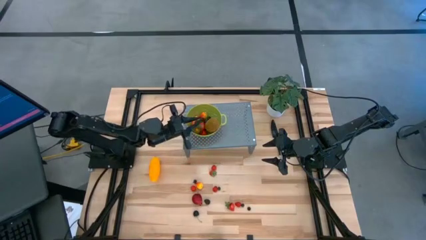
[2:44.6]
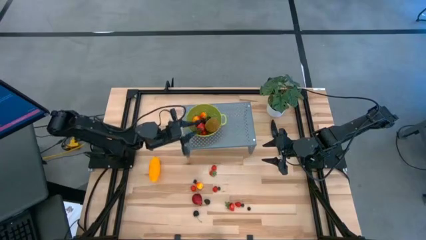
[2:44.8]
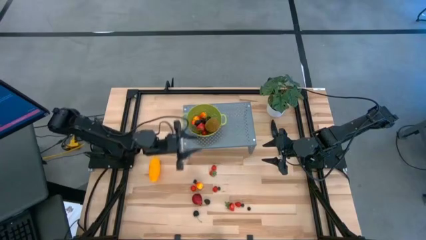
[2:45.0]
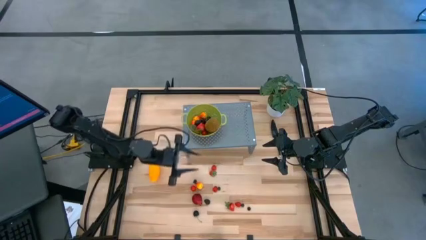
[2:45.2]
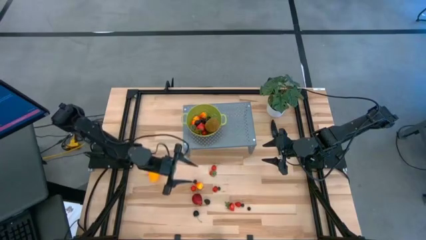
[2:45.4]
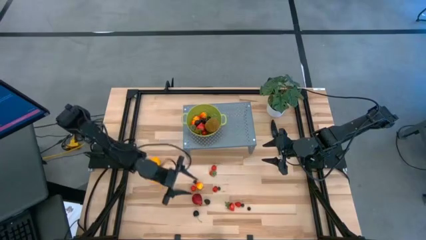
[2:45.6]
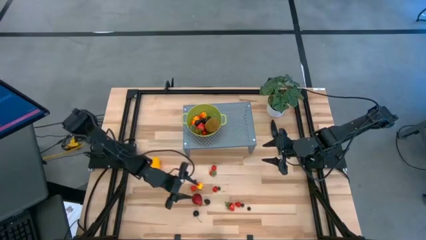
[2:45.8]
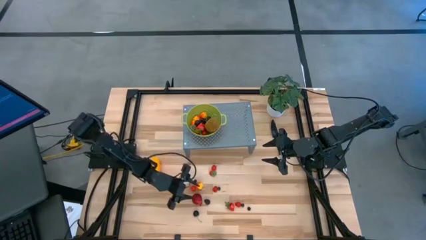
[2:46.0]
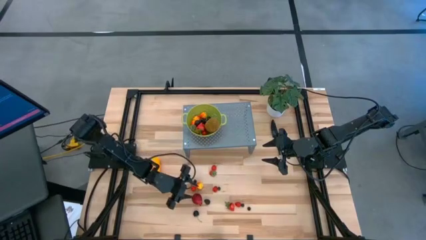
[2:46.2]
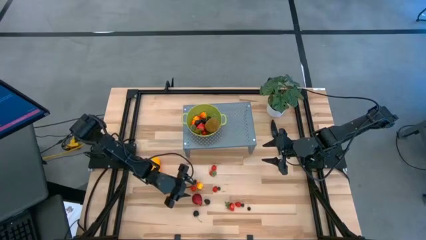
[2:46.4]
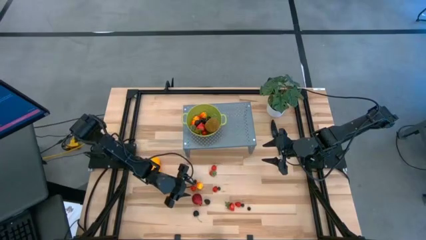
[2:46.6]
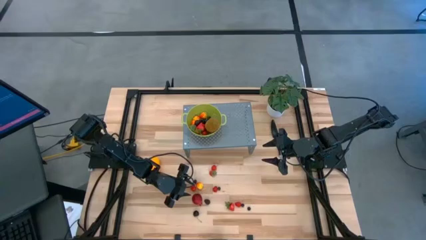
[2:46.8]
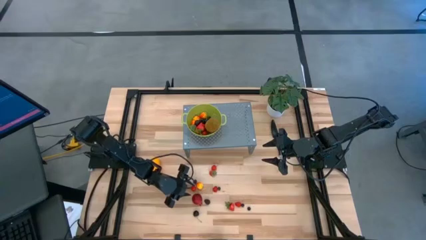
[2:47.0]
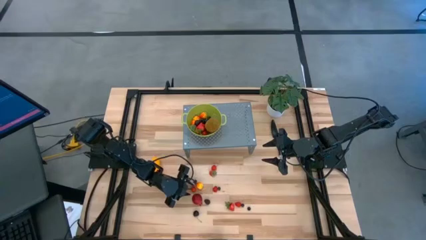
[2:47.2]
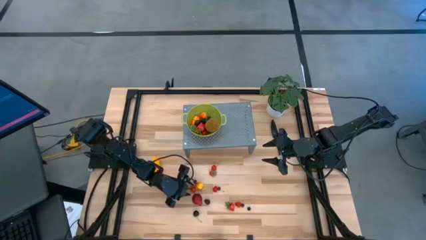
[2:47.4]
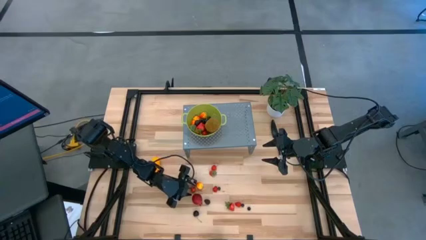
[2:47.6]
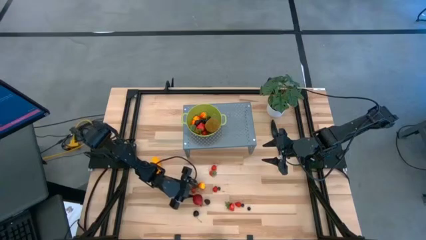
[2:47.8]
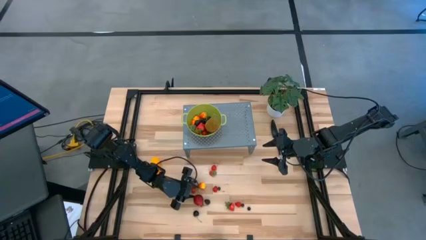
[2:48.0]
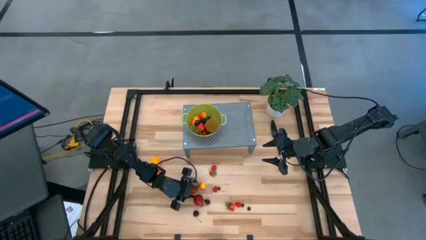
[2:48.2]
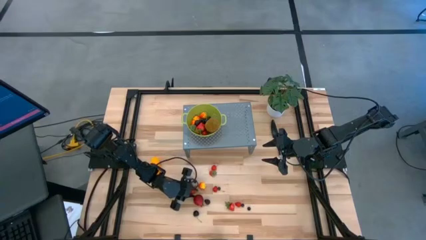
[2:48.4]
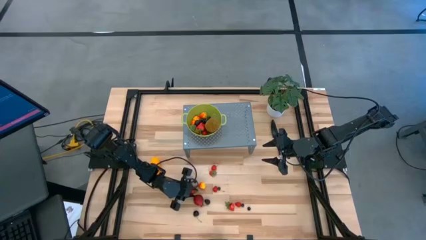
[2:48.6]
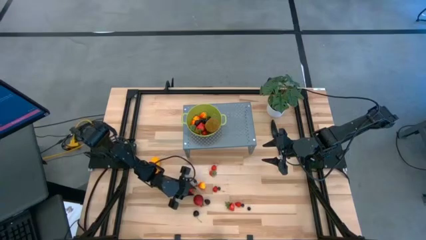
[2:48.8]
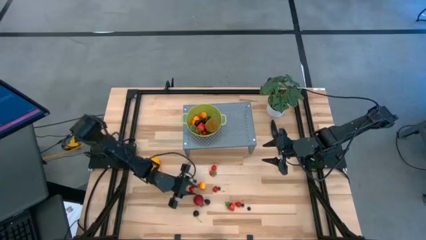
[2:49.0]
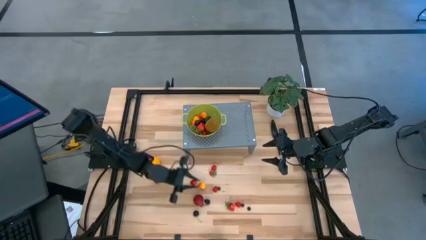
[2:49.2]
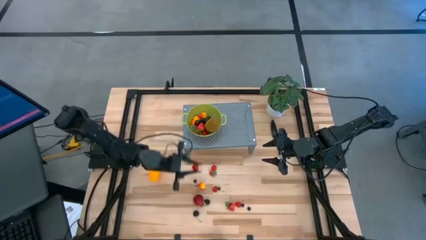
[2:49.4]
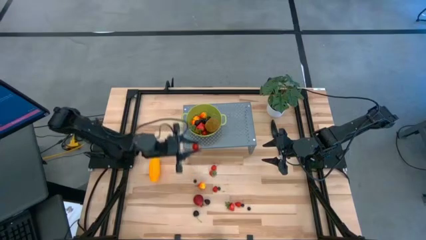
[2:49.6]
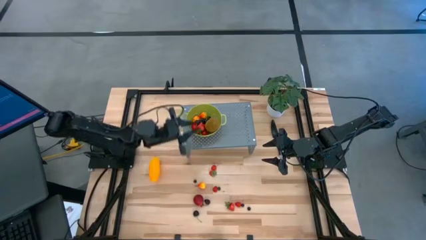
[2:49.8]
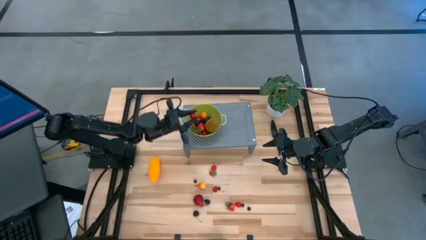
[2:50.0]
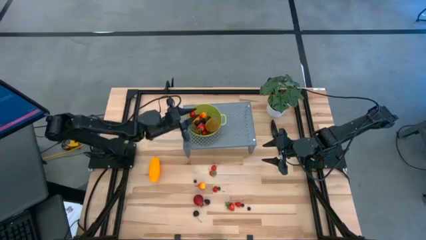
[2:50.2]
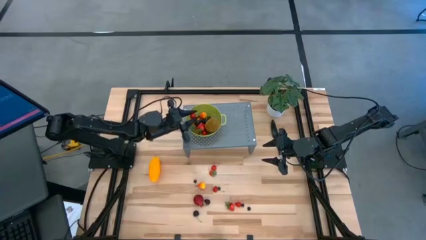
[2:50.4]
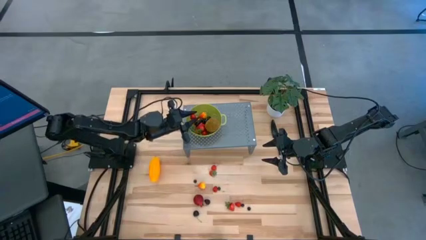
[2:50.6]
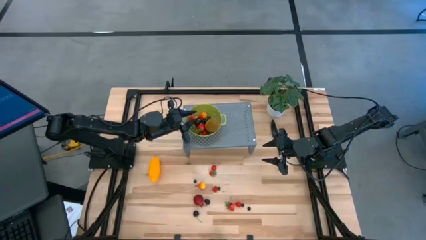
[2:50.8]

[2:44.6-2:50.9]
Task: Pick & Place Fruit
Put the red cherry into the green strainer bowl on the shelf

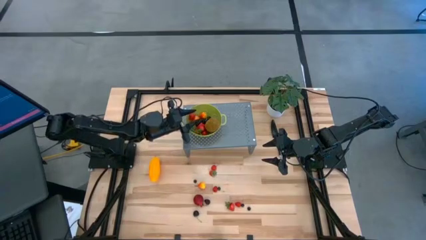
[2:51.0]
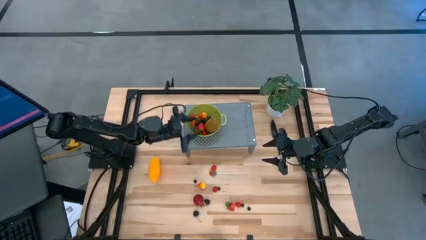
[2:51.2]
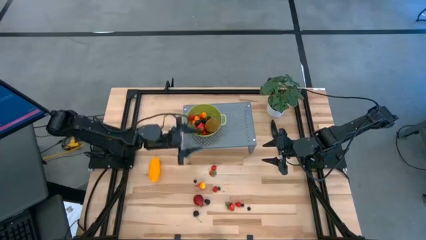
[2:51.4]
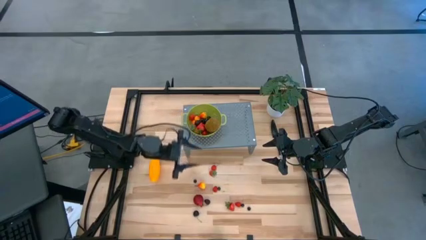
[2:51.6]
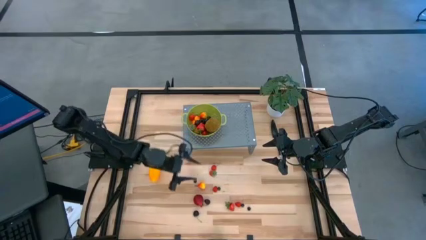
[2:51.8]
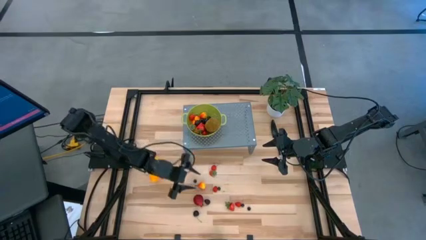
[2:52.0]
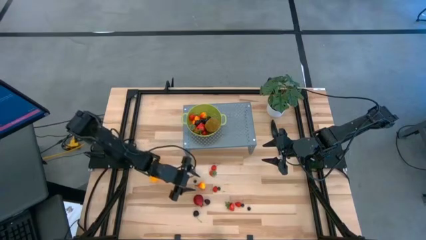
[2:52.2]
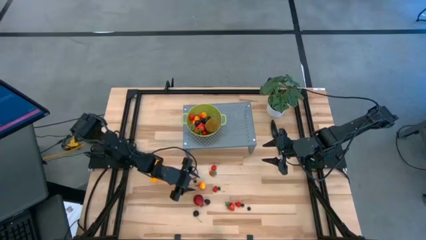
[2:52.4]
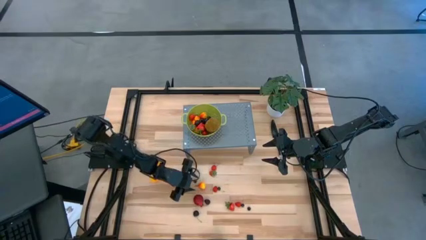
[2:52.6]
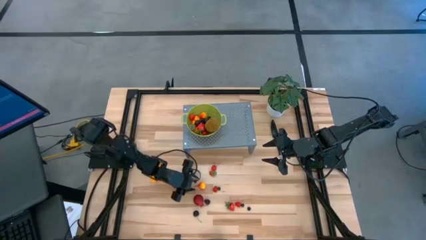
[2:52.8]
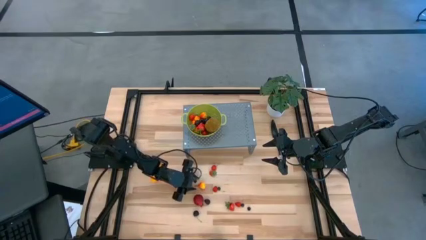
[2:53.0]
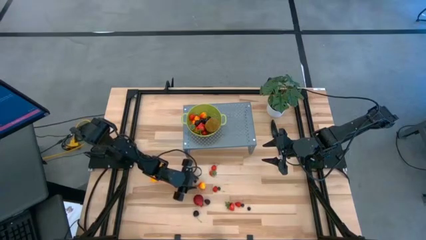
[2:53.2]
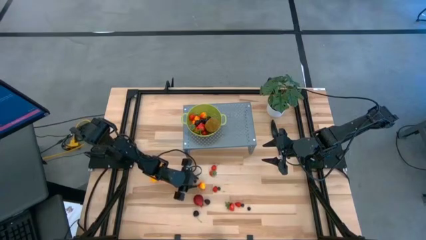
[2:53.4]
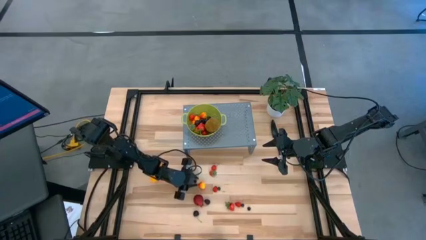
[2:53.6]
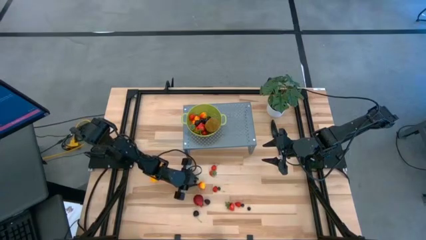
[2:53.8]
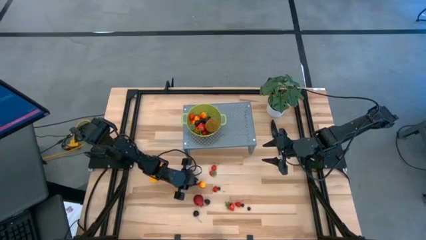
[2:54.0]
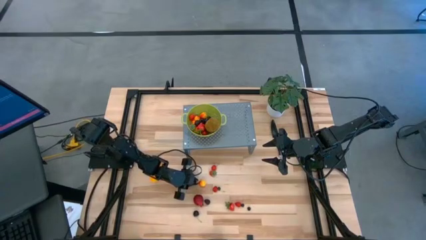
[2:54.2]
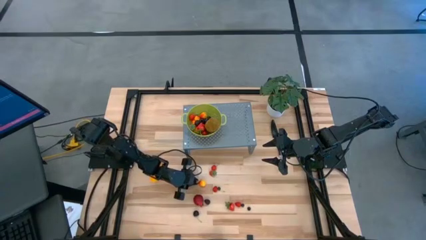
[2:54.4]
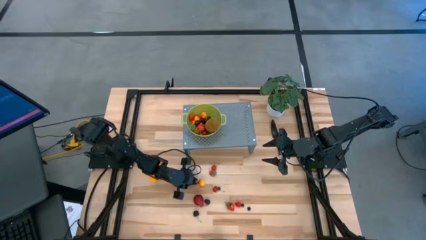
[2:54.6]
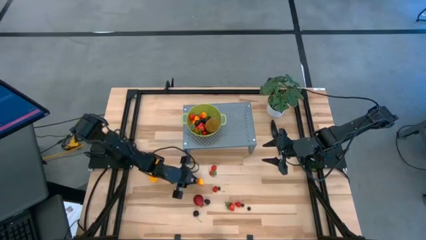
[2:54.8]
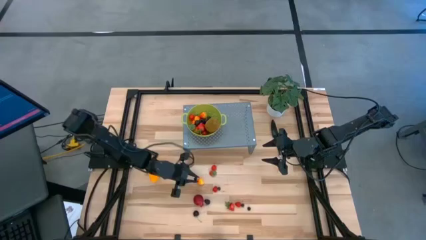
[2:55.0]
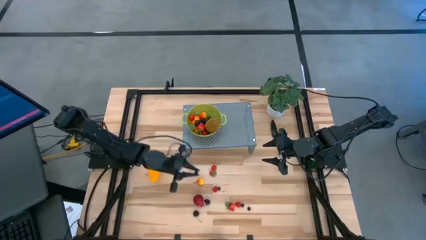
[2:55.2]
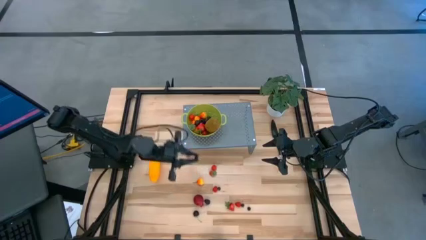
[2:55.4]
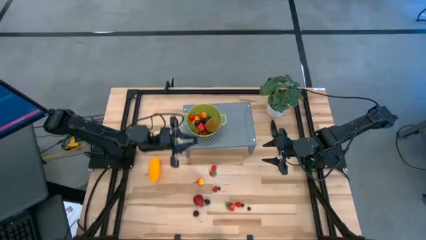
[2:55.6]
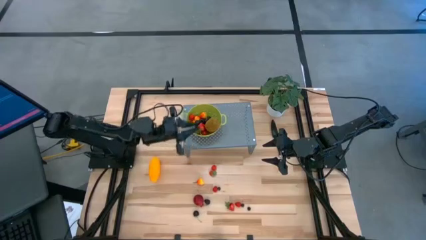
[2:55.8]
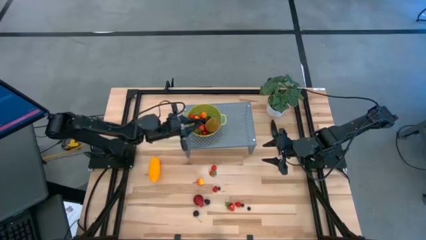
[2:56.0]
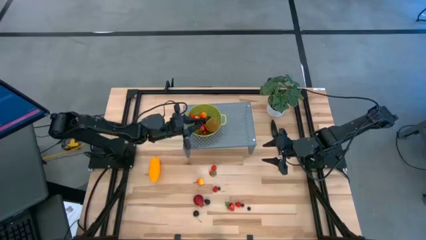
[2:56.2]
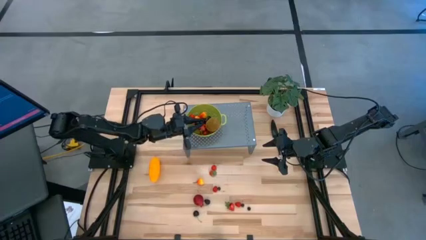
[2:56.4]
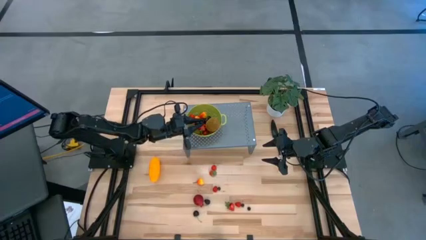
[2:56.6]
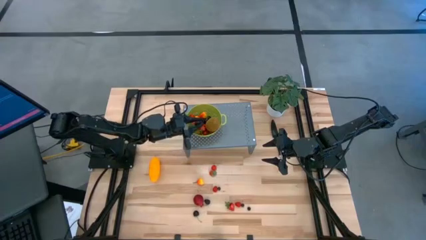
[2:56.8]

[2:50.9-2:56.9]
Put the blueberry into the green strainer bowl on the shelf

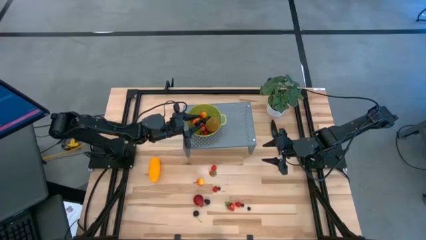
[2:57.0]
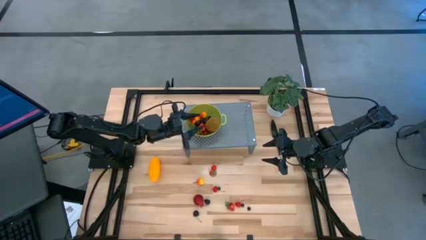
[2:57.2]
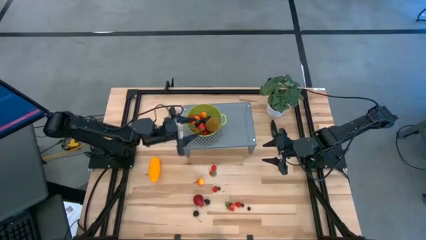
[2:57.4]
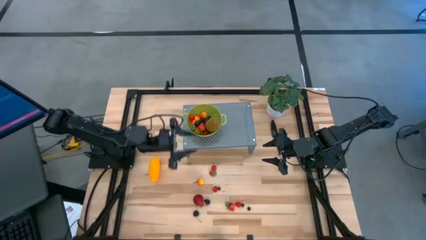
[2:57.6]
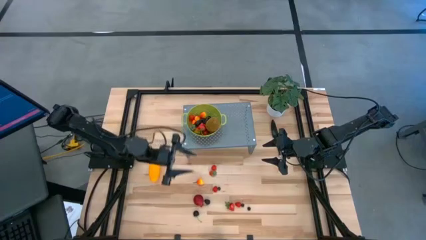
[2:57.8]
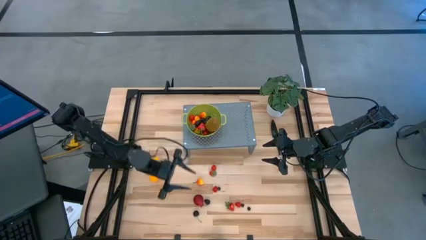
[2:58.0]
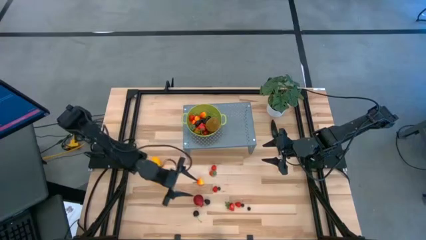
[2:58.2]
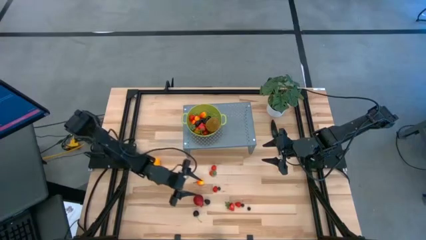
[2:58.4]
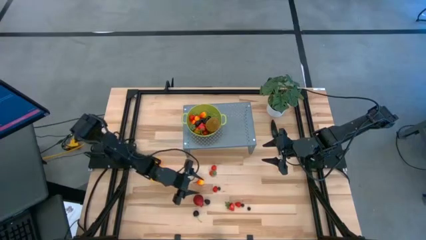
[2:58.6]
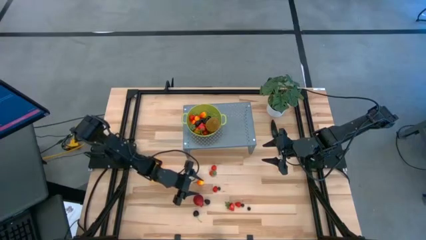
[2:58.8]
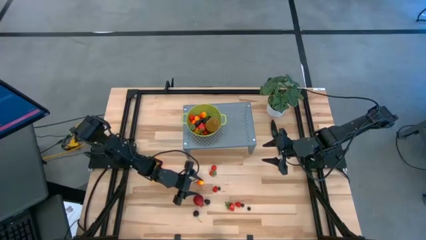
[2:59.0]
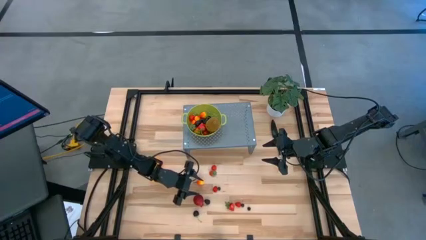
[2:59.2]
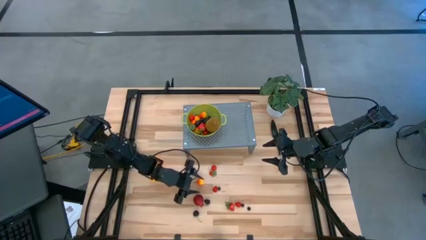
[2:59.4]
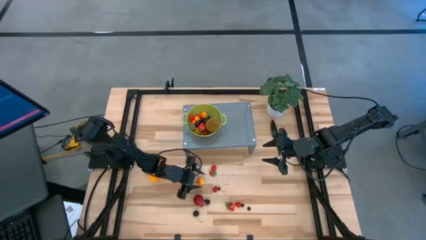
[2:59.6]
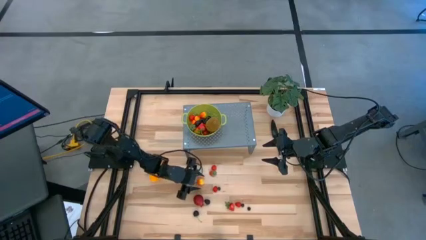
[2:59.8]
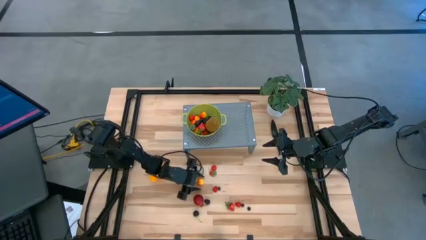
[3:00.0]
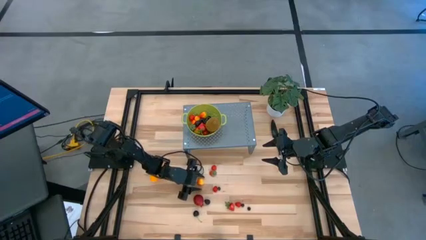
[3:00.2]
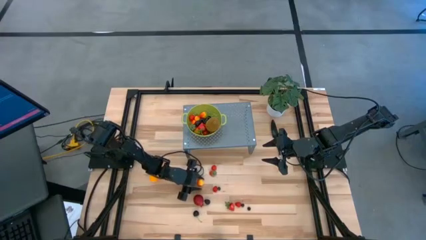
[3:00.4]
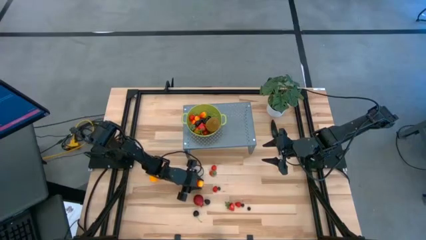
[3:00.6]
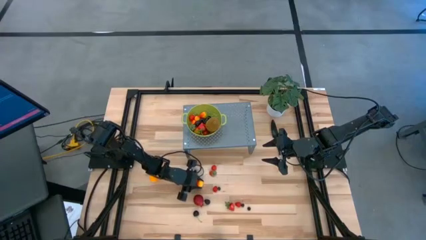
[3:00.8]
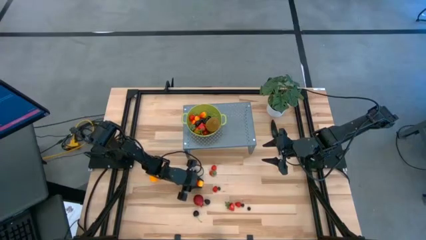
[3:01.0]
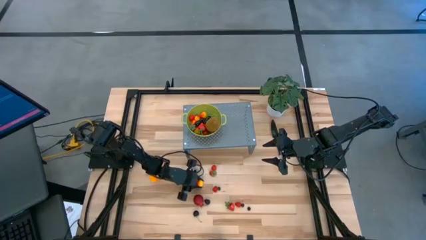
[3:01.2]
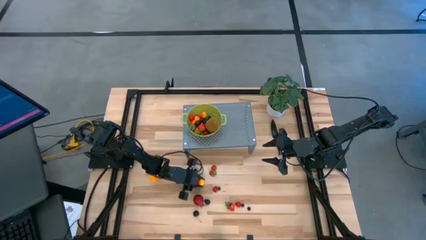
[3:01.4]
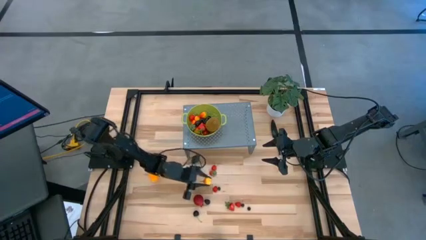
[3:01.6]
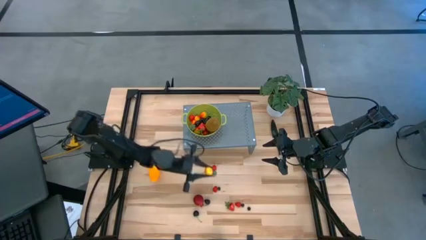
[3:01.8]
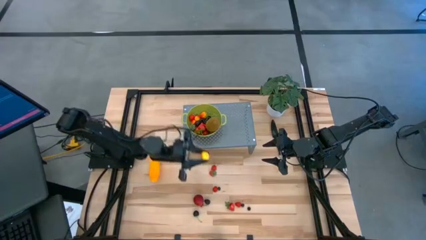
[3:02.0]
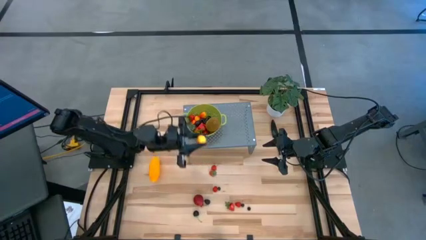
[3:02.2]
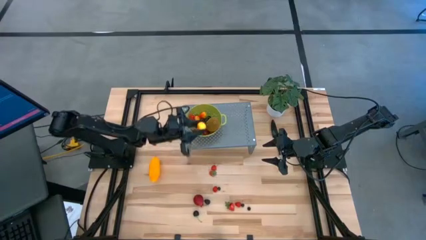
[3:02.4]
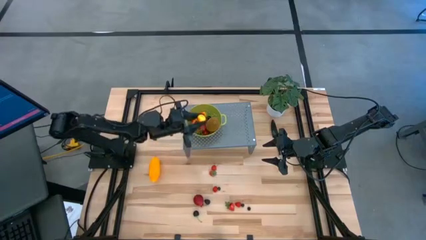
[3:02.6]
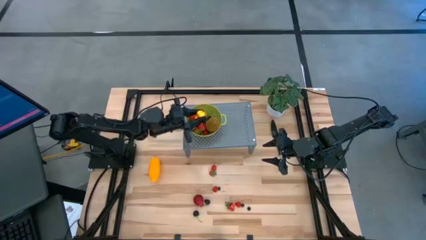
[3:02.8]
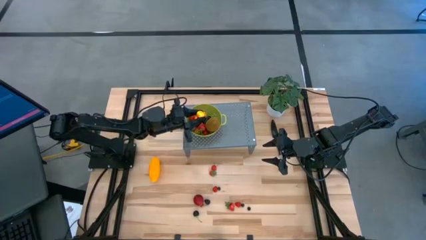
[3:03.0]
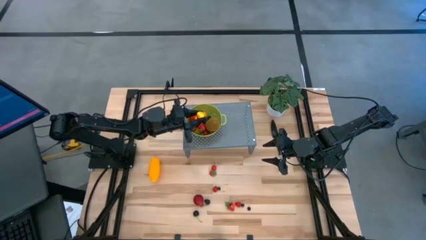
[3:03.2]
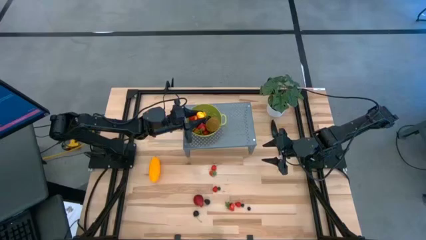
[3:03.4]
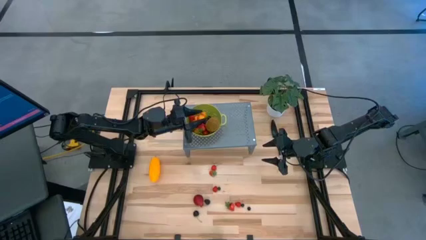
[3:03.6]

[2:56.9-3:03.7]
Put the peach into the green strainer bowl on the shelf
